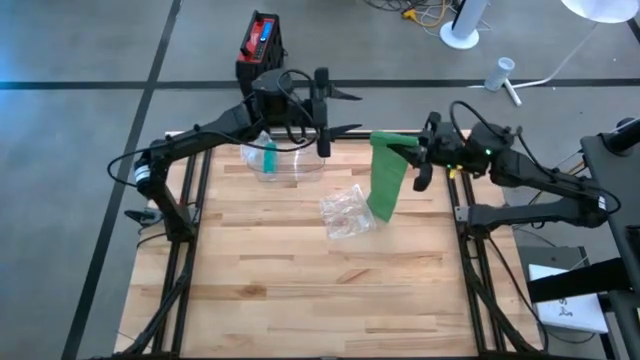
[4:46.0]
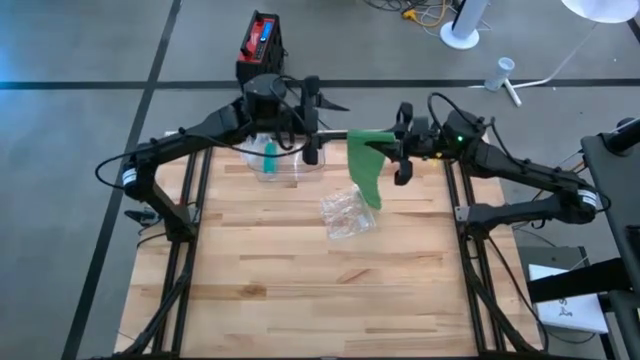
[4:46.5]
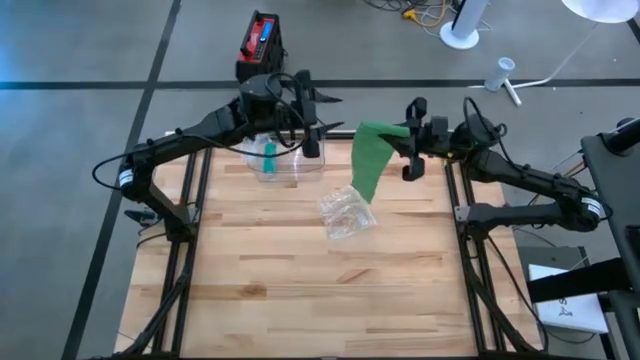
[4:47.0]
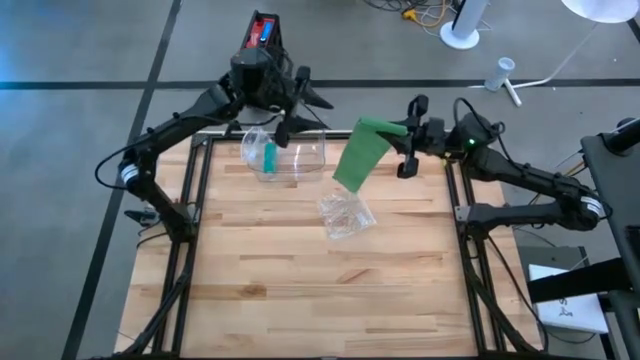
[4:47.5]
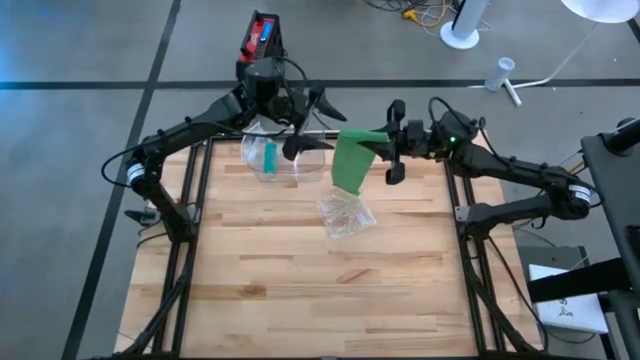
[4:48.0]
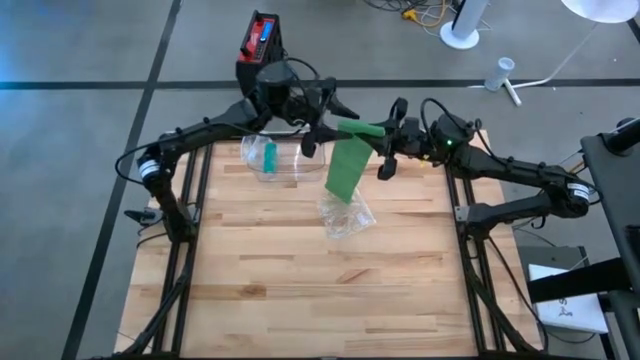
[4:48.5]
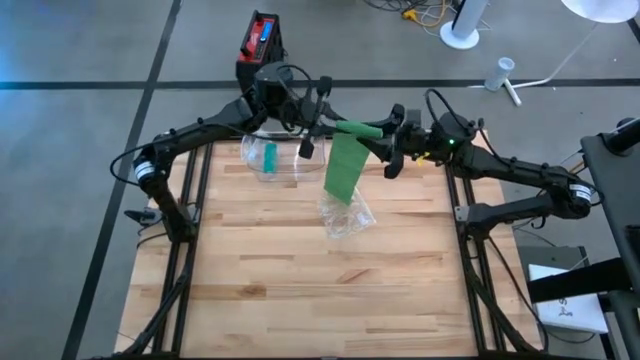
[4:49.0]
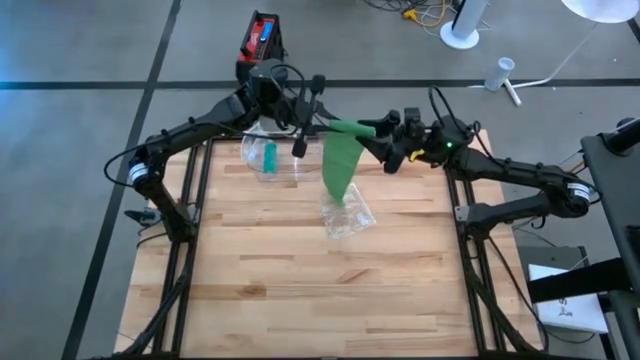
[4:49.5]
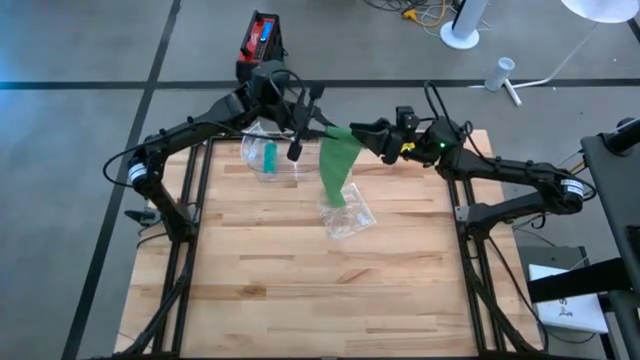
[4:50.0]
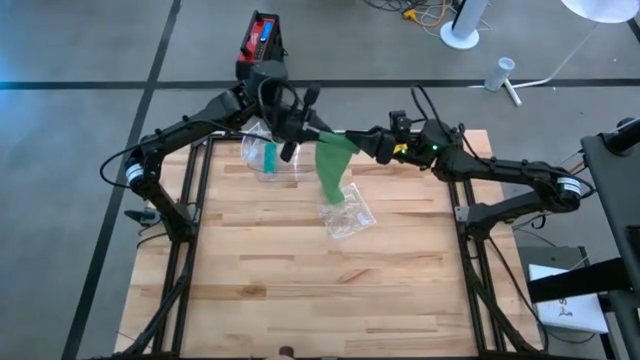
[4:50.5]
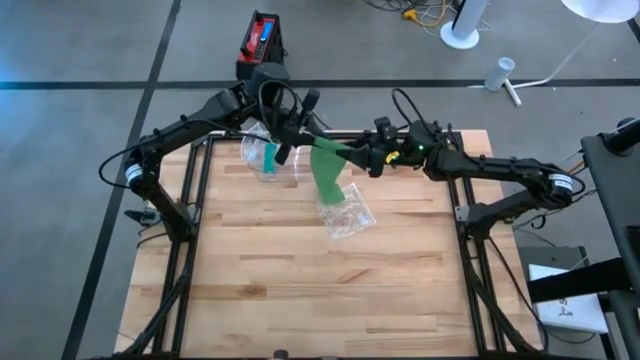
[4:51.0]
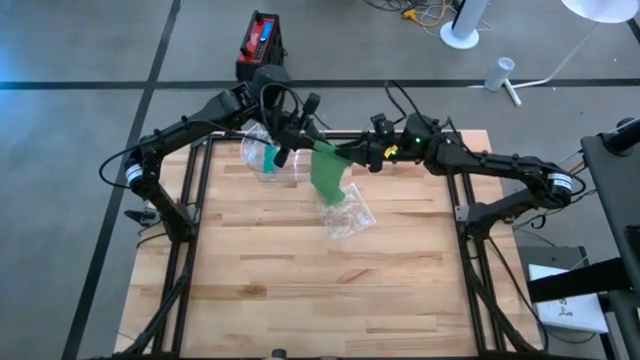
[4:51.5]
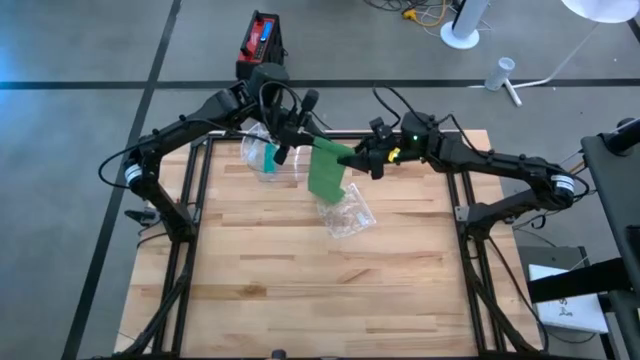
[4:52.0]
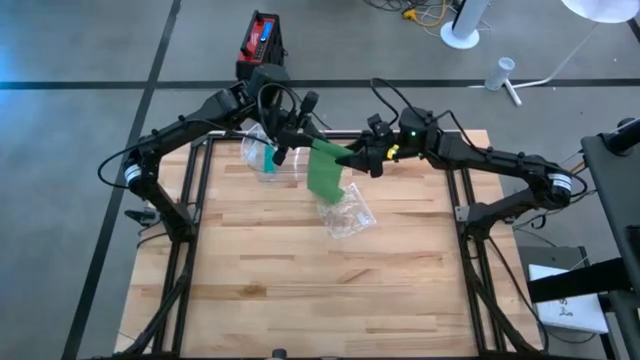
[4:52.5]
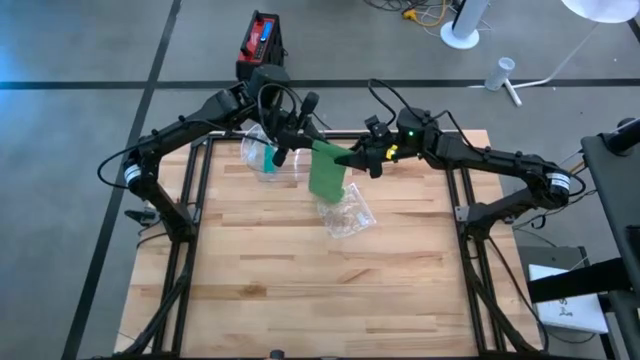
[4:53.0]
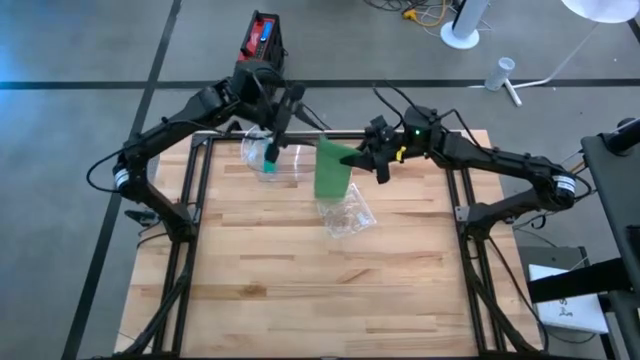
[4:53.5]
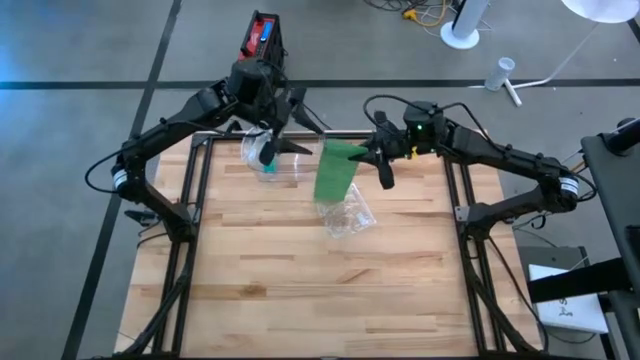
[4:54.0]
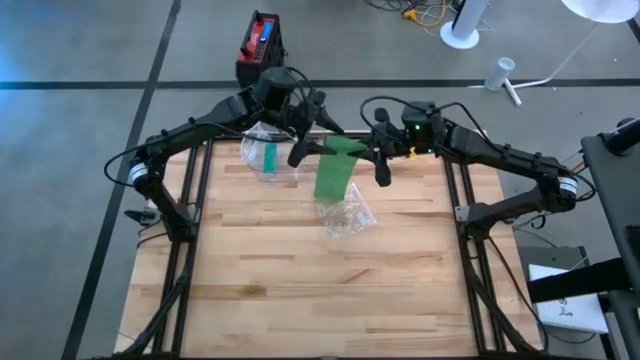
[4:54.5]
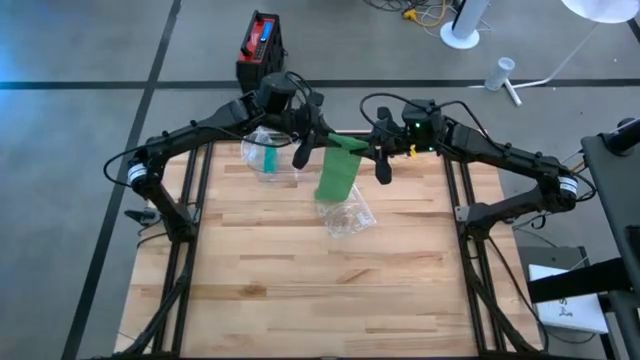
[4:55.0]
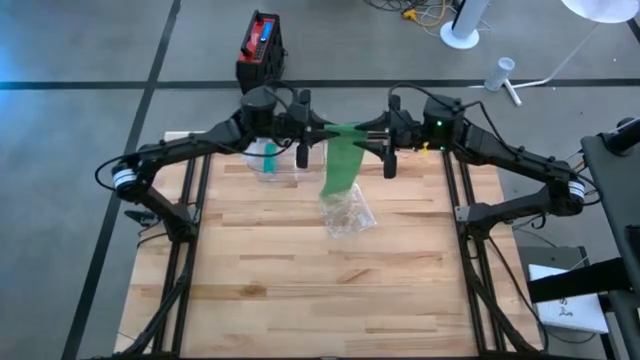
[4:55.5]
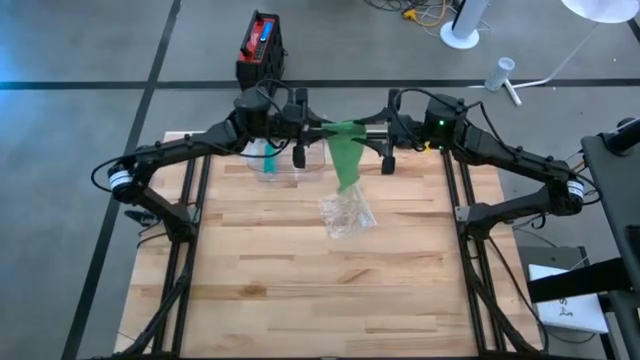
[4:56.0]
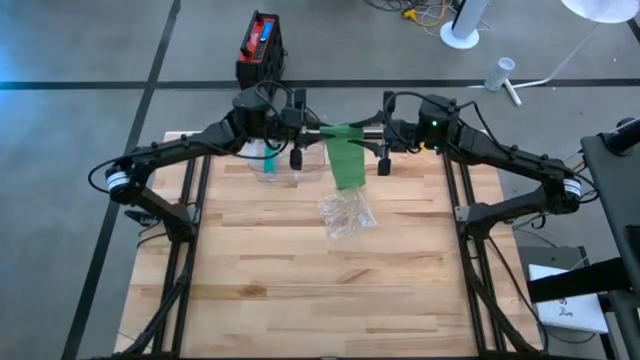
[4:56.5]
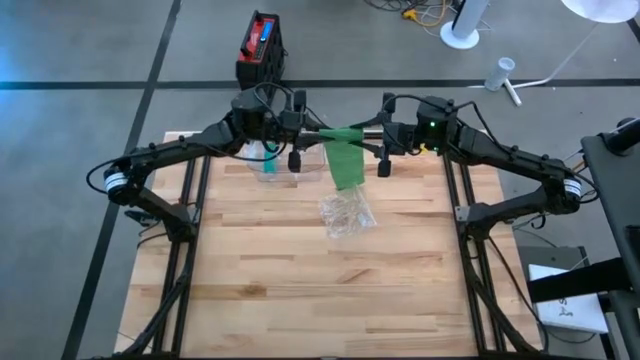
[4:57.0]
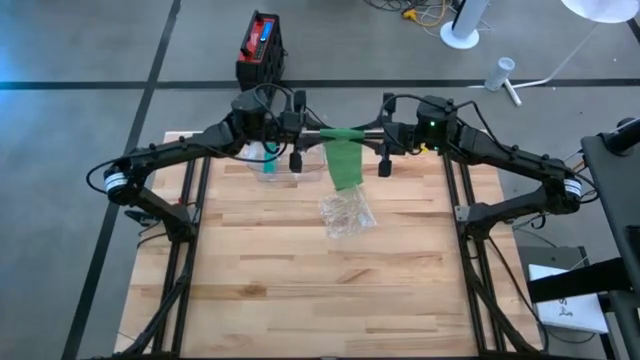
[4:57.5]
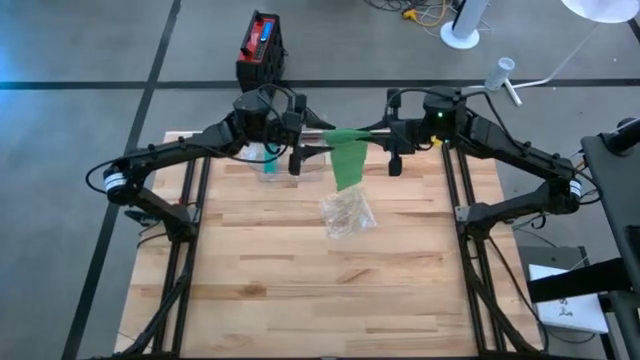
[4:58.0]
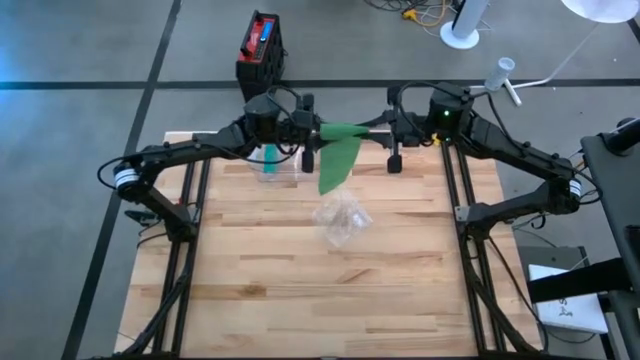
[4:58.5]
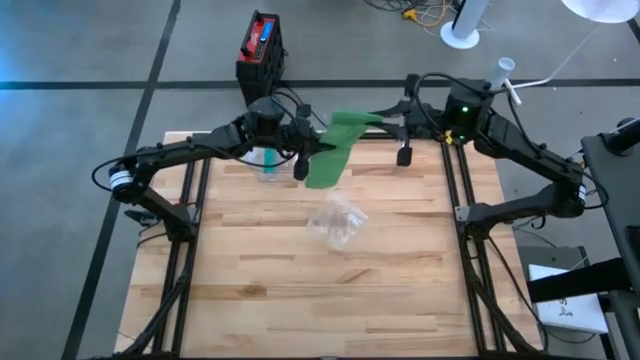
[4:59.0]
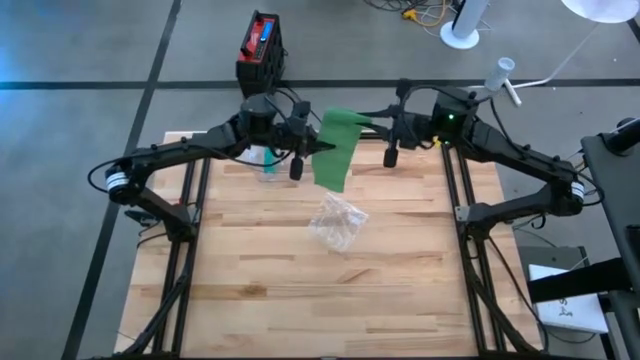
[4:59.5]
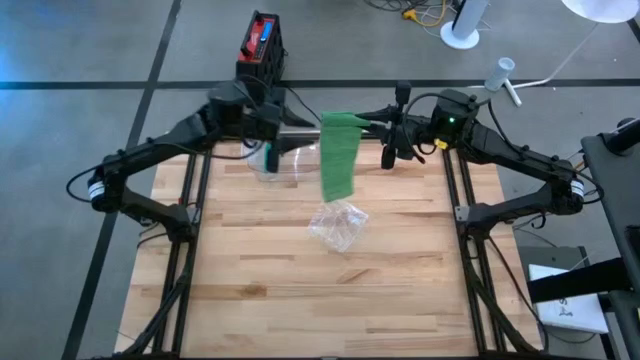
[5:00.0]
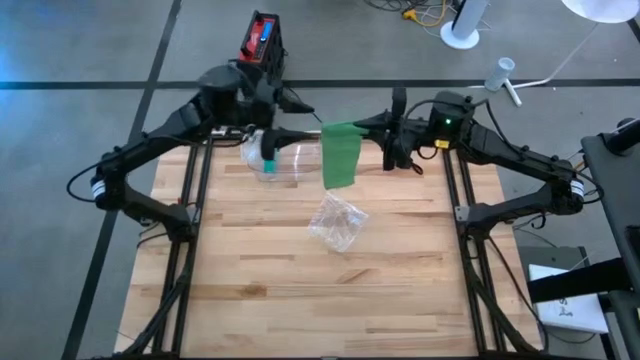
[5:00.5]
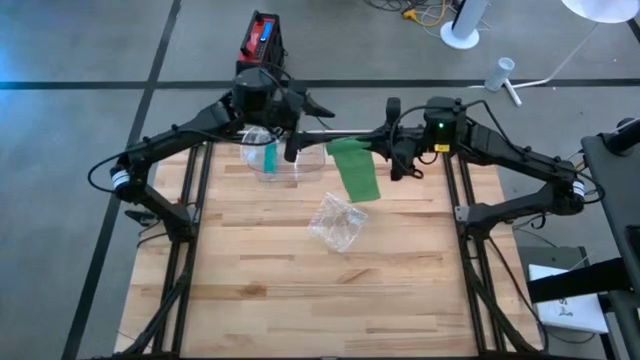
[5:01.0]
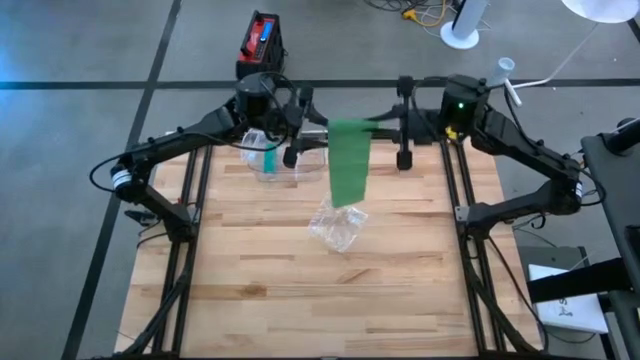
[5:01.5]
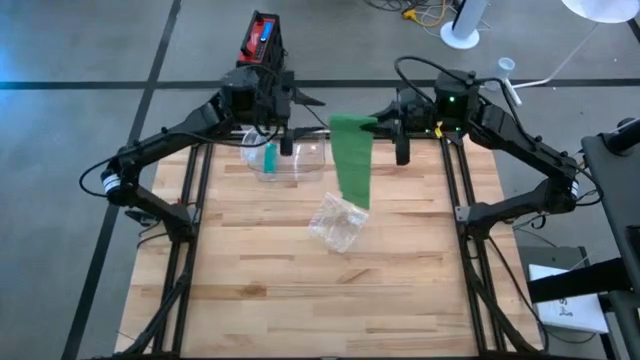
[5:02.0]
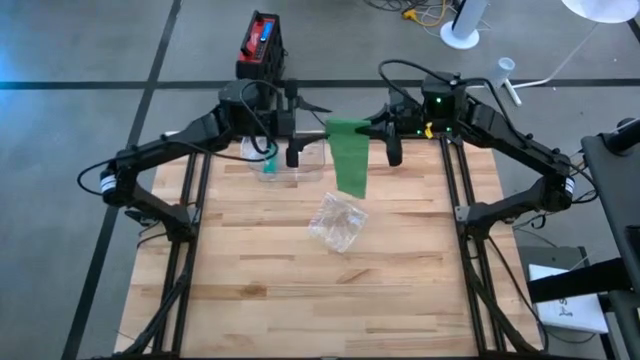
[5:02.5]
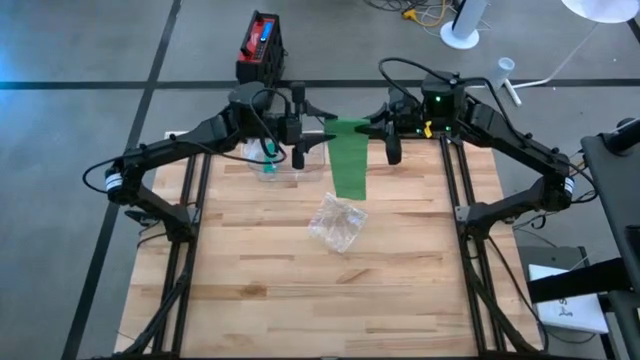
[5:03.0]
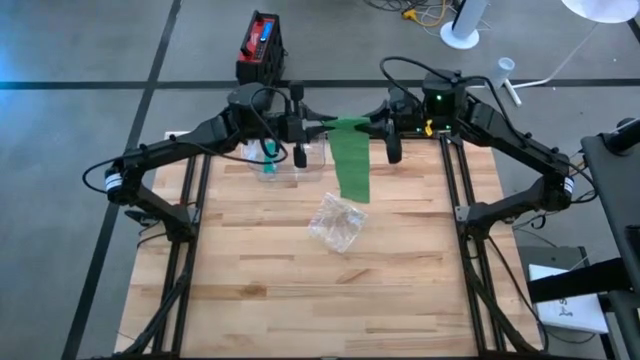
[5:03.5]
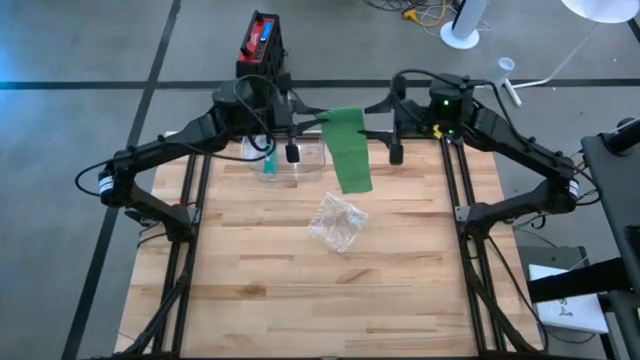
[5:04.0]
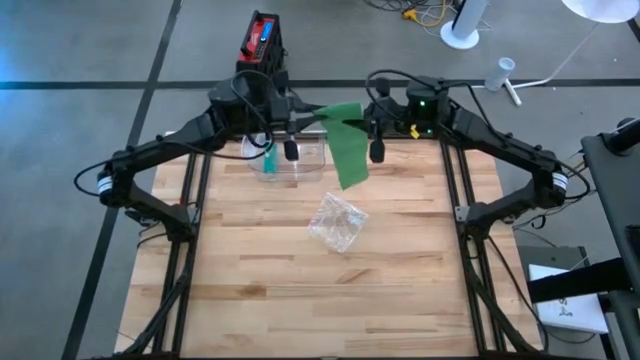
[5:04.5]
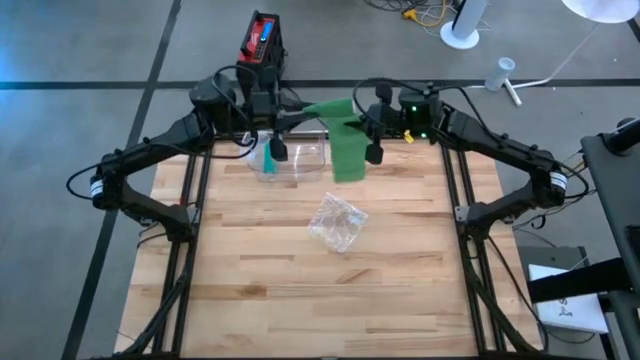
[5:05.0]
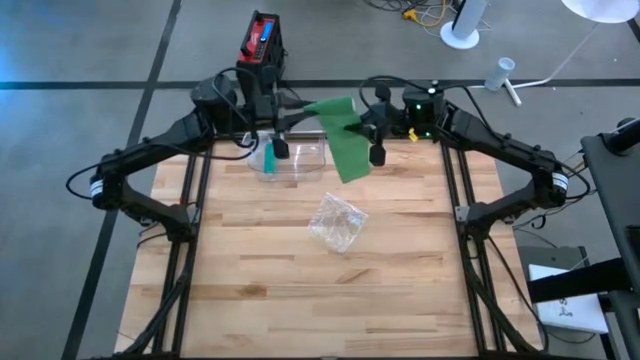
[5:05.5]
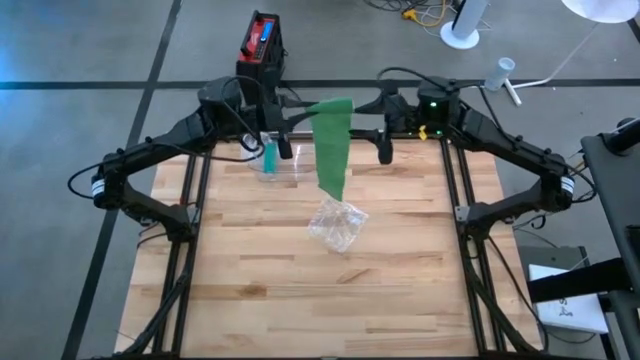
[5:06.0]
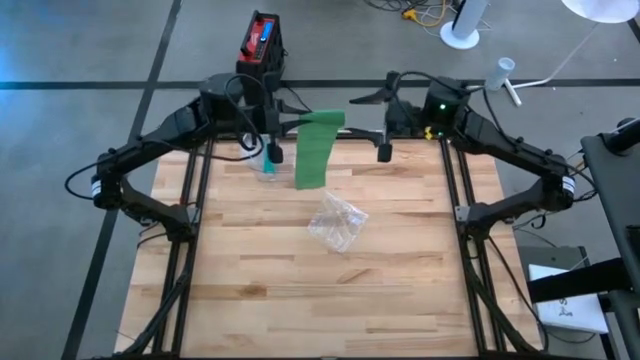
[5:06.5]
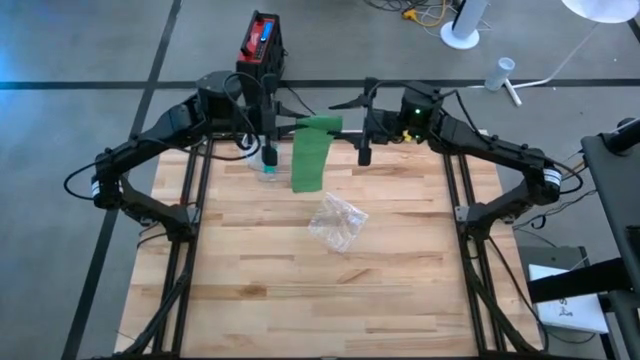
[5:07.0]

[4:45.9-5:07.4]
Task: Roll bandage
Roll the green bandage
